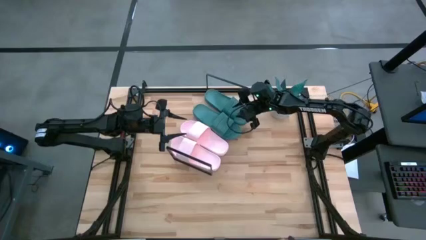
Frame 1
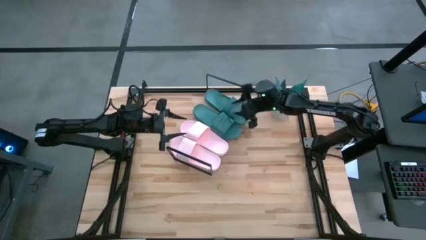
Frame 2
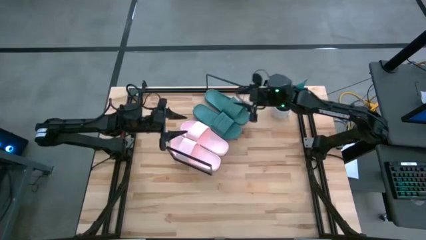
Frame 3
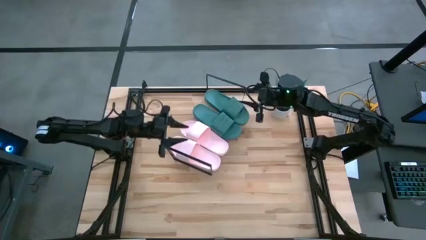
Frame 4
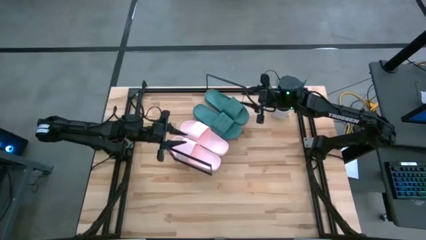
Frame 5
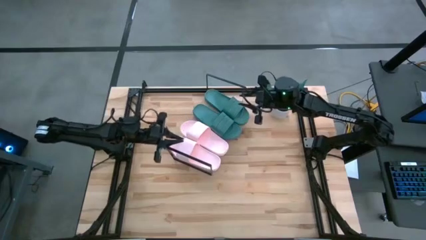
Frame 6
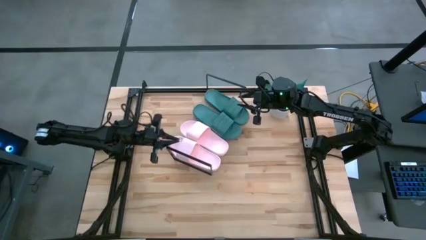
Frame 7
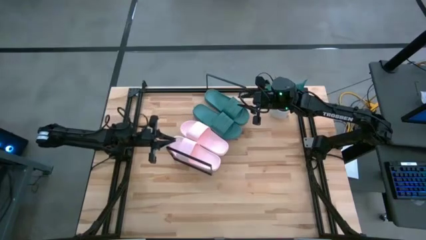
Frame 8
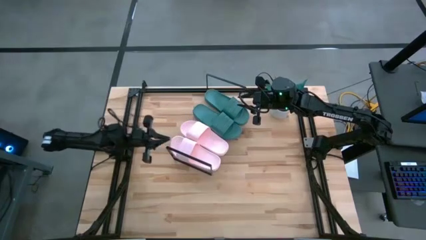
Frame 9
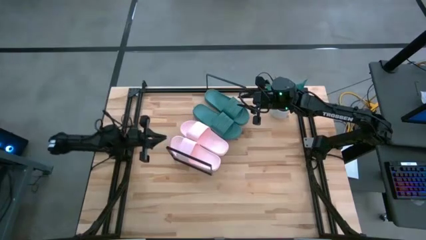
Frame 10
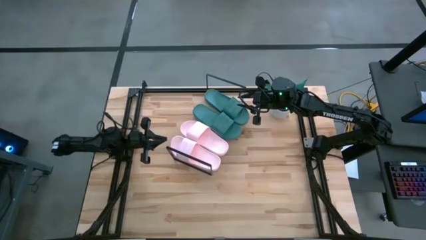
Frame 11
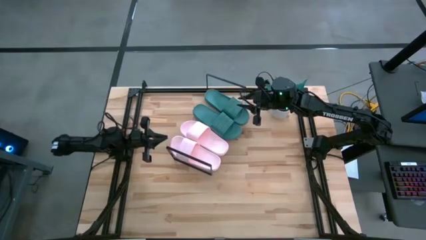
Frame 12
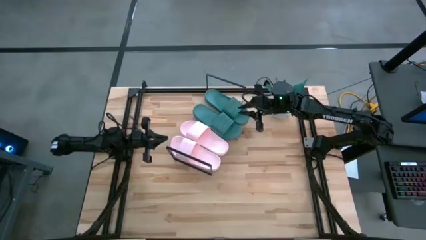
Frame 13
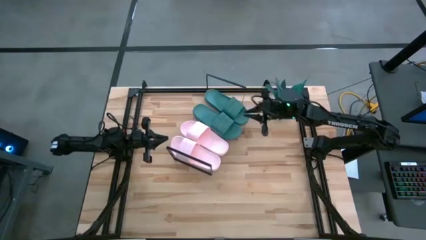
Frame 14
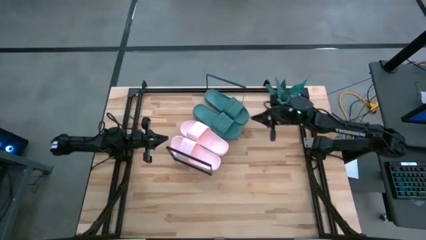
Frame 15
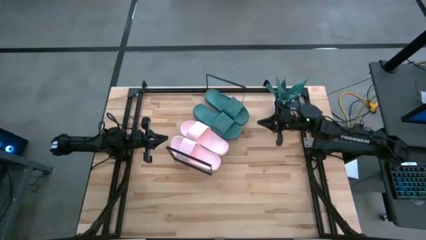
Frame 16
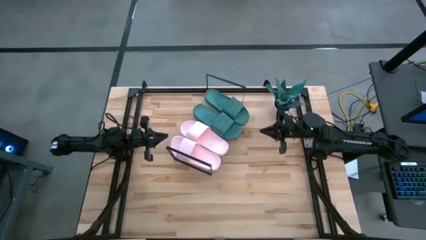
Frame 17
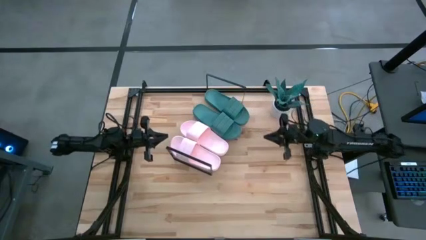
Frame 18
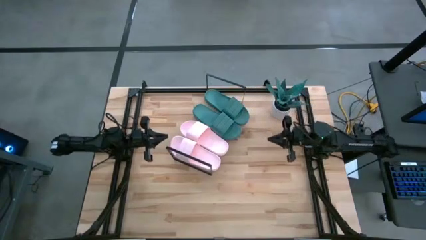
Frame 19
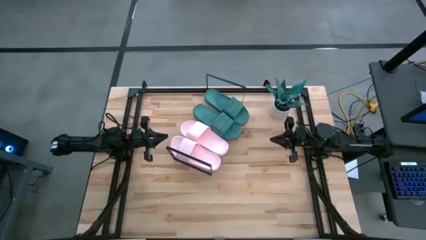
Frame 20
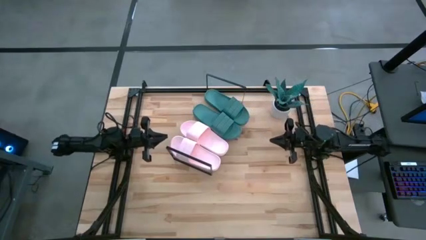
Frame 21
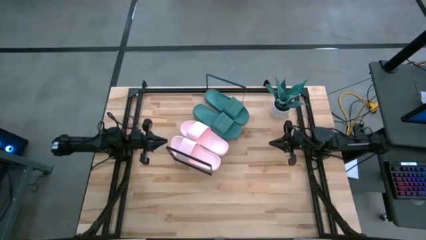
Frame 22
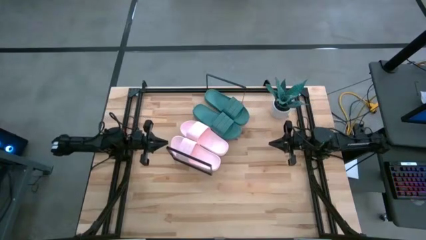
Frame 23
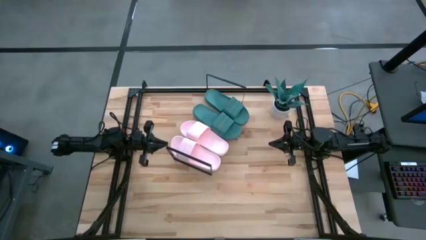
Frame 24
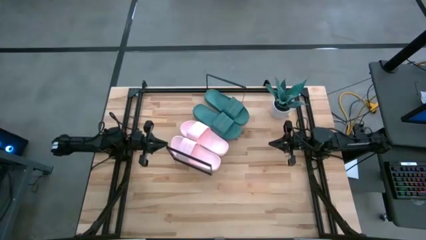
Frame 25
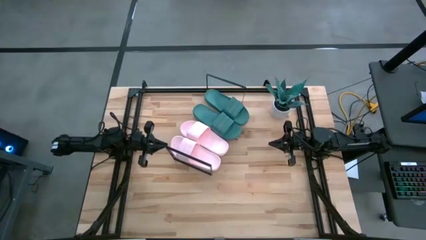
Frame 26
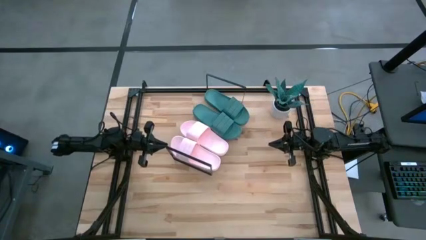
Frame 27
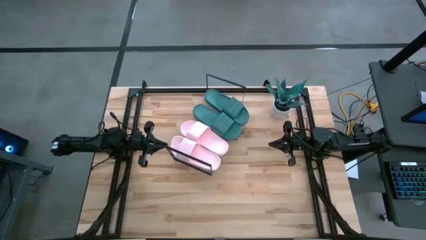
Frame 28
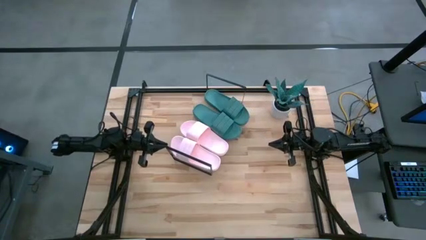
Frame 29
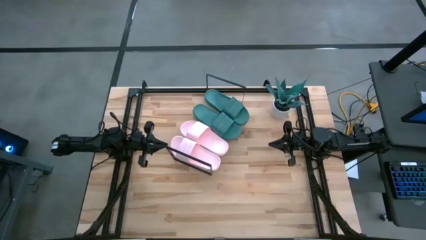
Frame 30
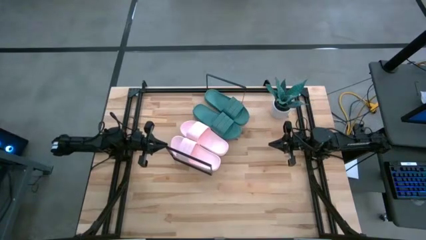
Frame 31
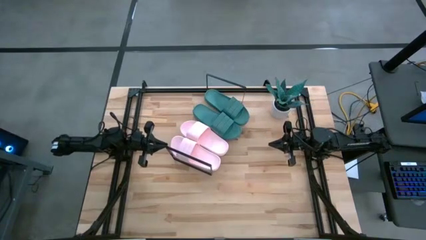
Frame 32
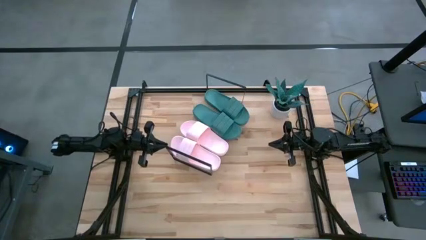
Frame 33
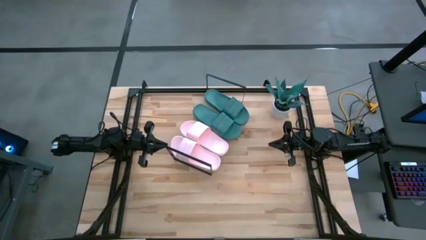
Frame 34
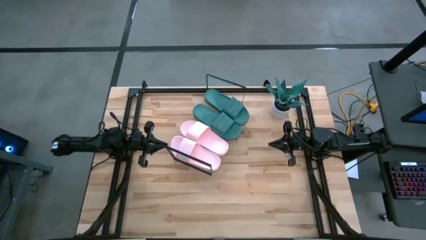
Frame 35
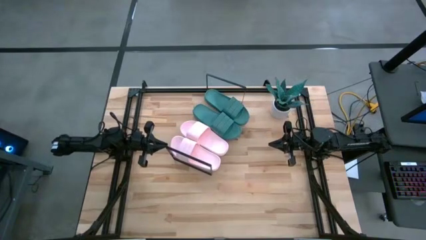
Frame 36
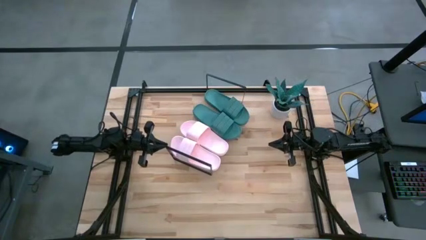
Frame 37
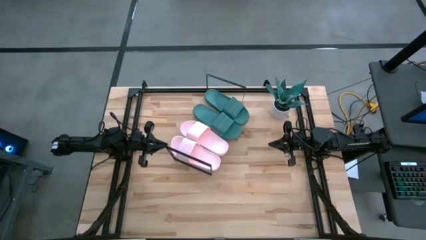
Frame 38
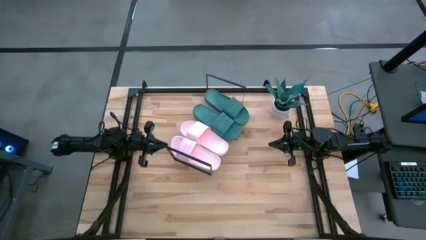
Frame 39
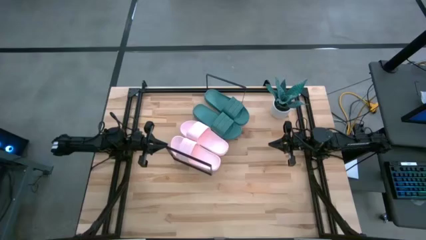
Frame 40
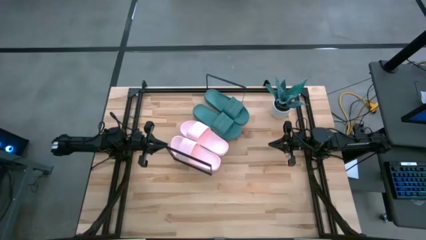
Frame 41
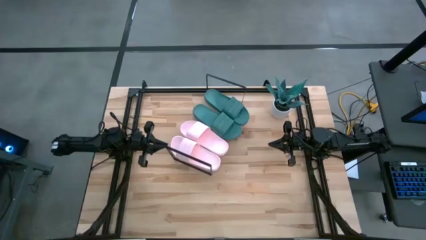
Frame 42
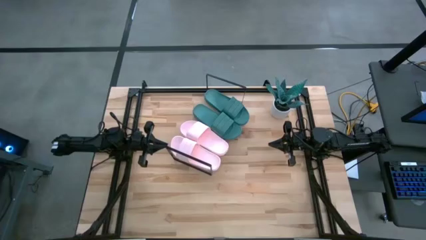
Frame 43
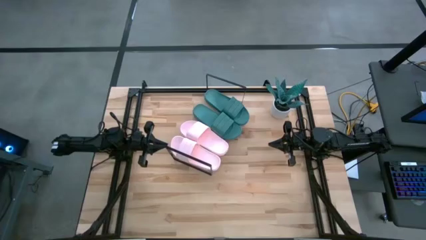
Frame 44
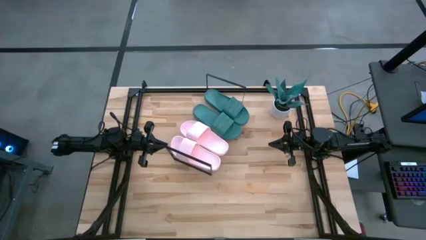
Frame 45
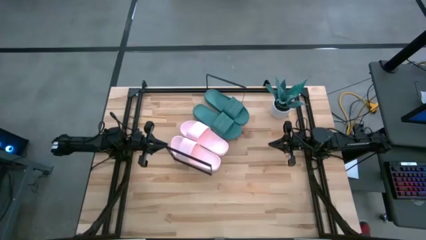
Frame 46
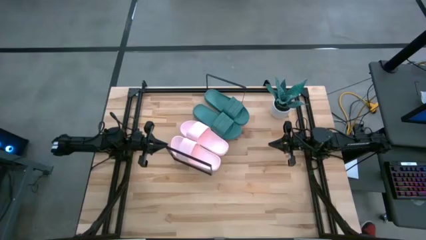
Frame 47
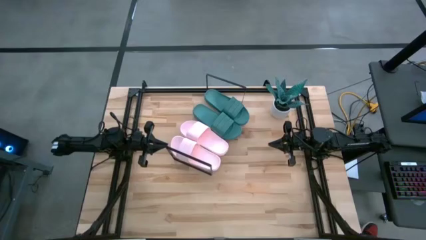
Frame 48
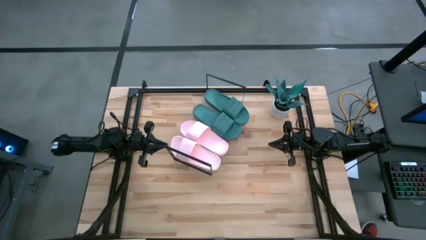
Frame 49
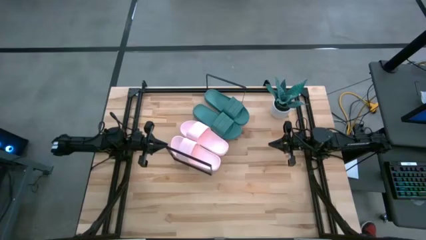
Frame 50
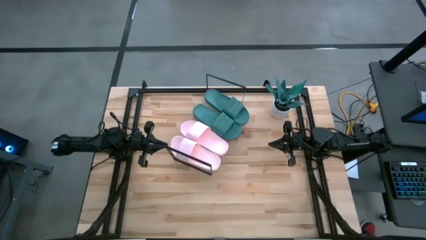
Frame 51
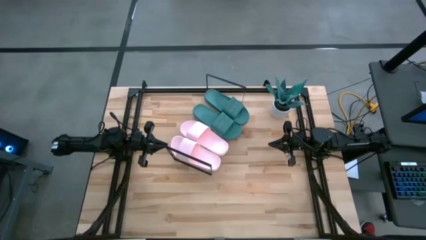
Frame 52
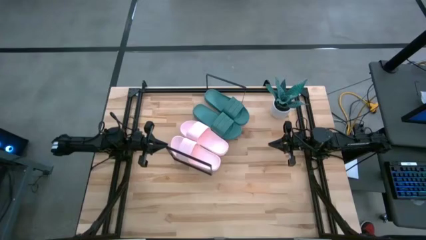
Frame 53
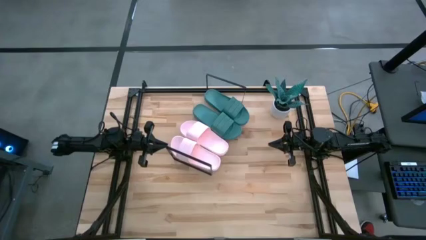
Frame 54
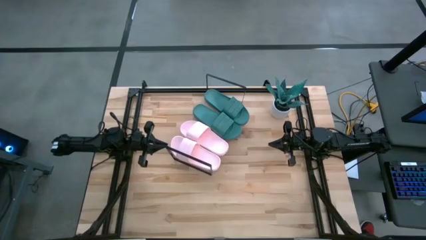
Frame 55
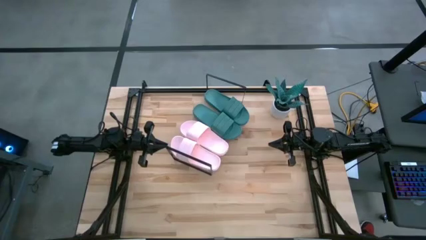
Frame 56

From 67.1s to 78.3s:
Task: Pick and place slides into the shelf
Return to Home Position

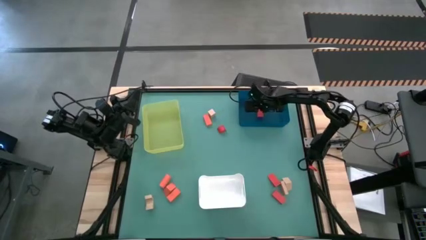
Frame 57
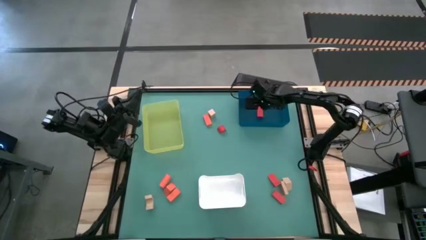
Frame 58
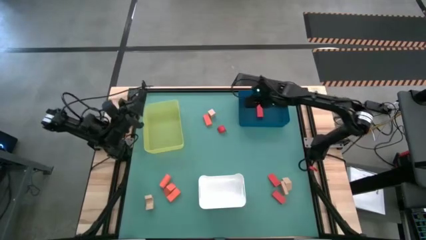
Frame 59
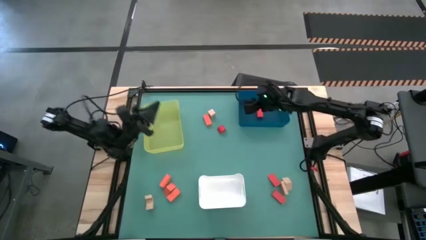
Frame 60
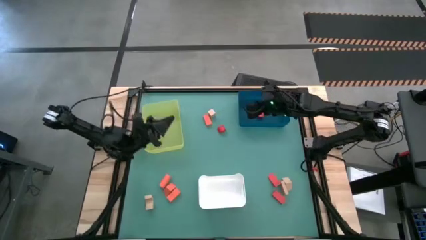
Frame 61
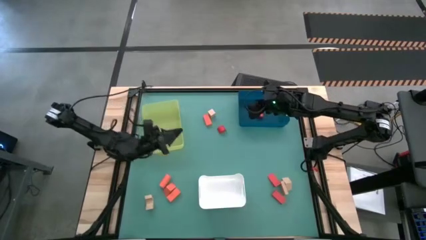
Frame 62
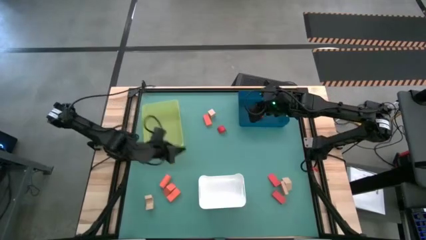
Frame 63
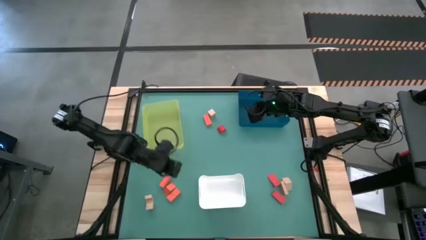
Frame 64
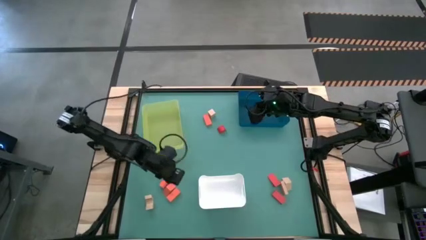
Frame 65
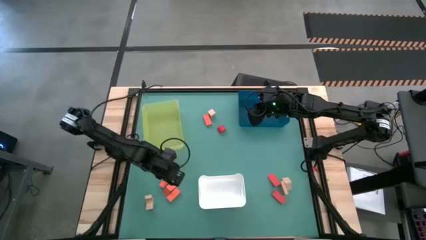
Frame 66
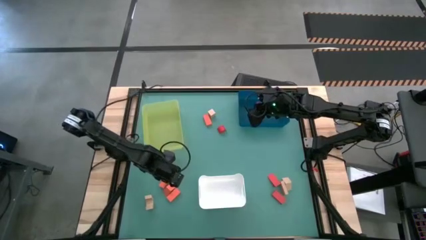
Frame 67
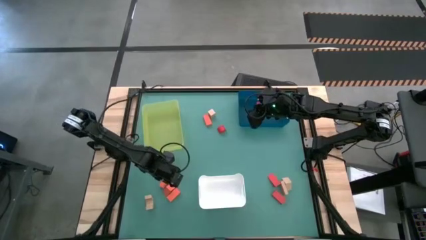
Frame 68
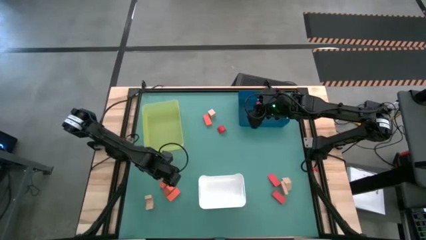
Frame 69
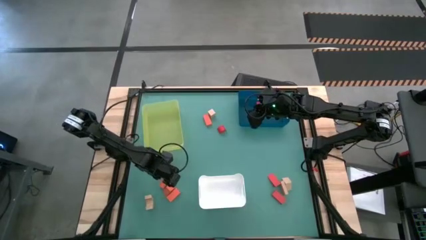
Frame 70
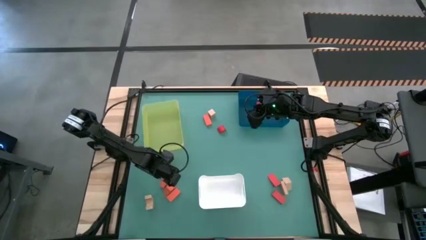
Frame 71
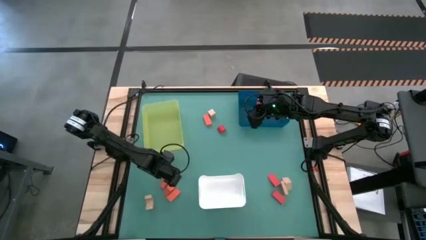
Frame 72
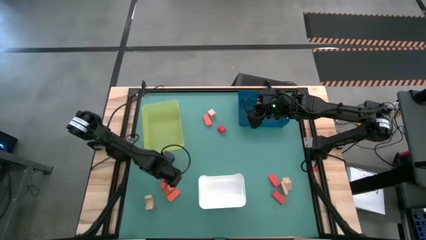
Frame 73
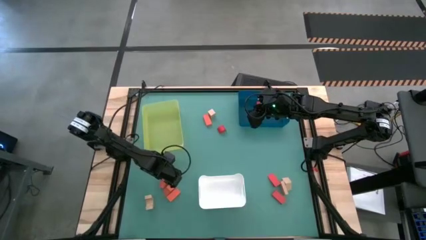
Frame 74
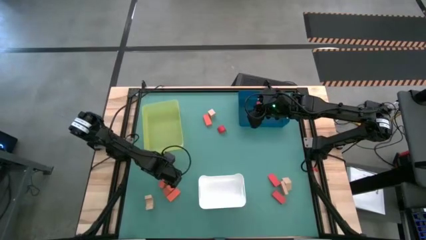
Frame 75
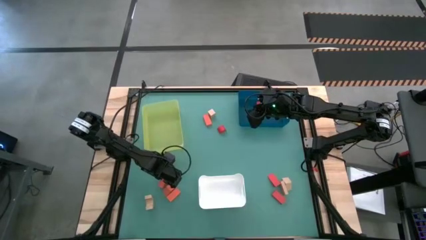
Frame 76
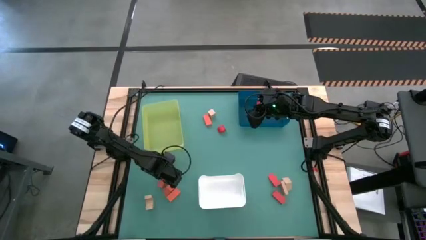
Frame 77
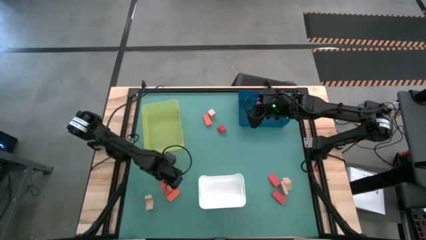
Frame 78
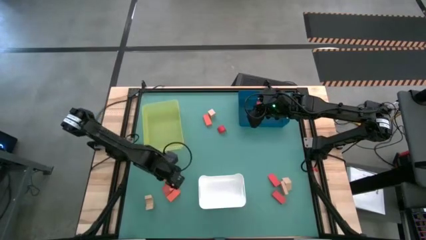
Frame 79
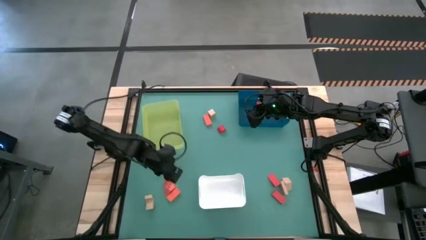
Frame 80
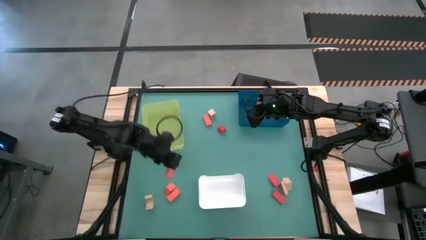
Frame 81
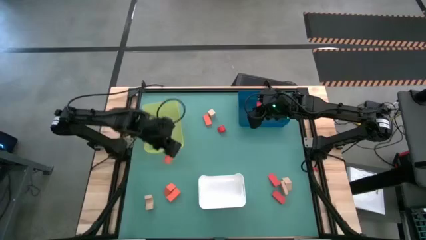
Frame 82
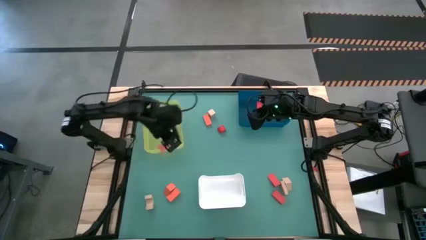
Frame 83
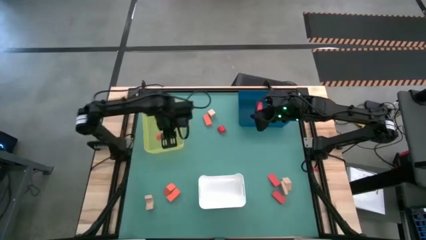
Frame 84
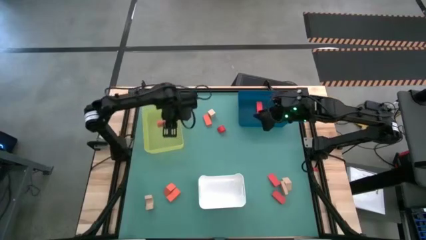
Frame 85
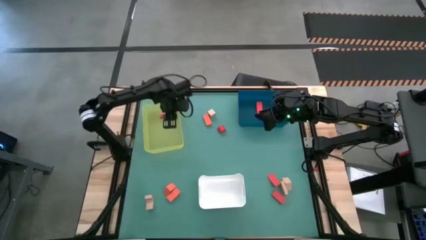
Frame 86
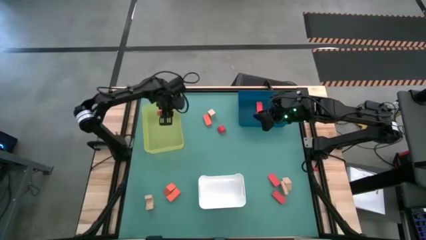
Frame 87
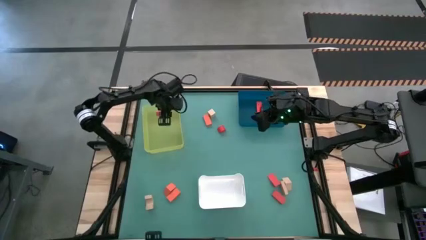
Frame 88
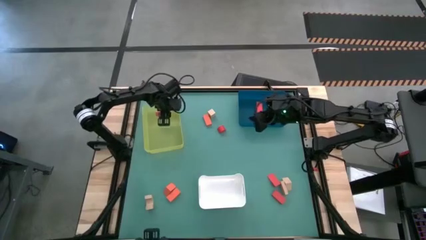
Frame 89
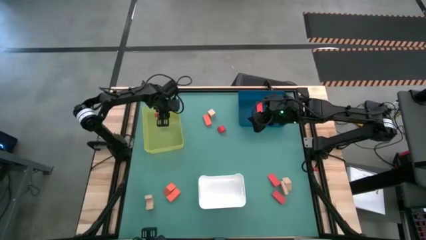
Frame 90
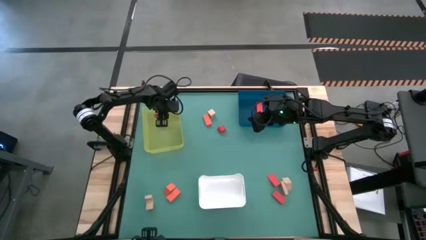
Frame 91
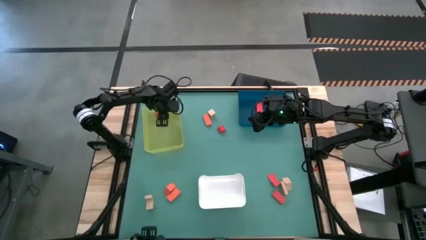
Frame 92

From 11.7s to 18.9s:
Task: Sort & place blocks by color
Put the orange block into the yellow bin
